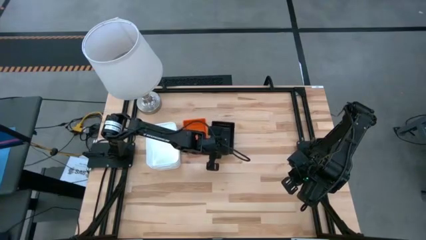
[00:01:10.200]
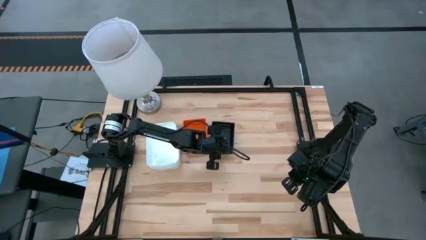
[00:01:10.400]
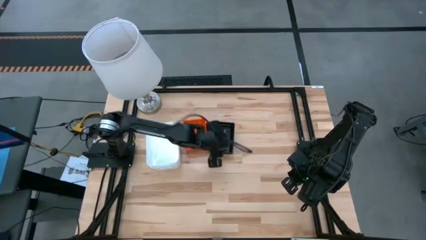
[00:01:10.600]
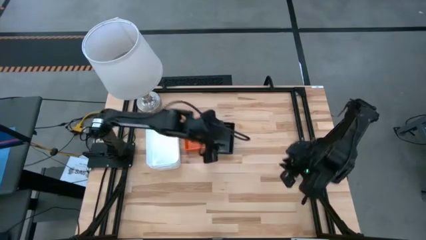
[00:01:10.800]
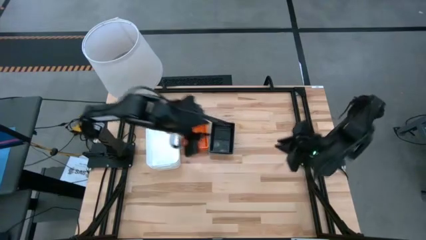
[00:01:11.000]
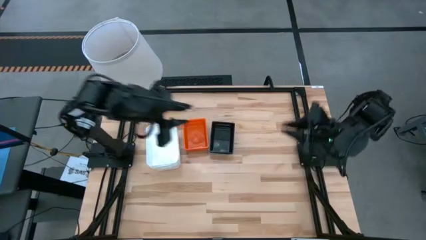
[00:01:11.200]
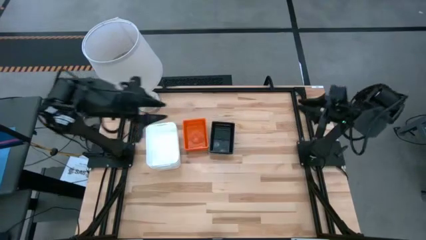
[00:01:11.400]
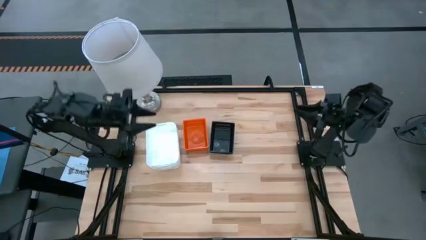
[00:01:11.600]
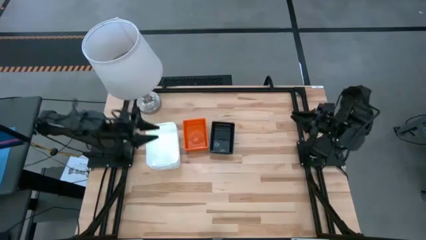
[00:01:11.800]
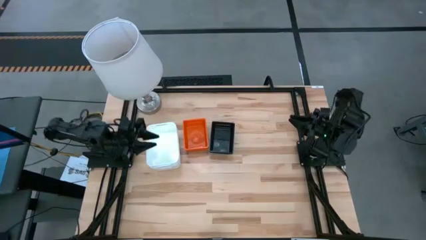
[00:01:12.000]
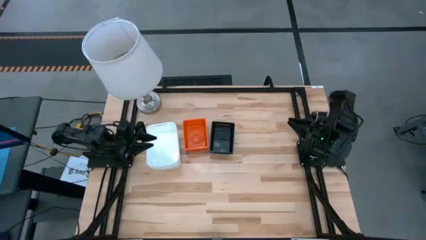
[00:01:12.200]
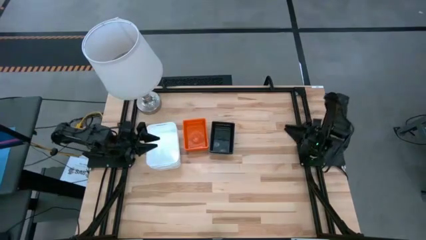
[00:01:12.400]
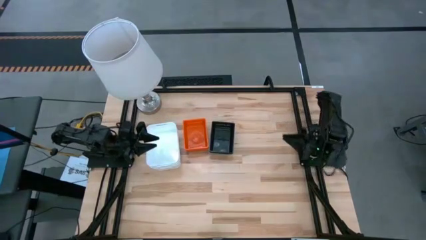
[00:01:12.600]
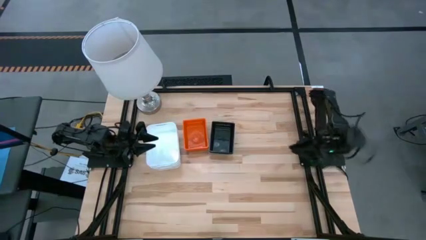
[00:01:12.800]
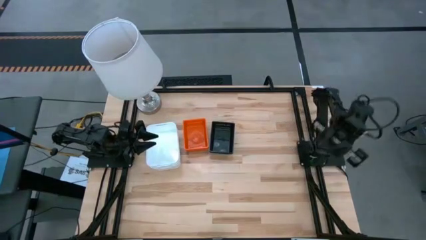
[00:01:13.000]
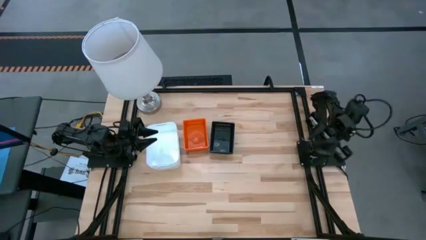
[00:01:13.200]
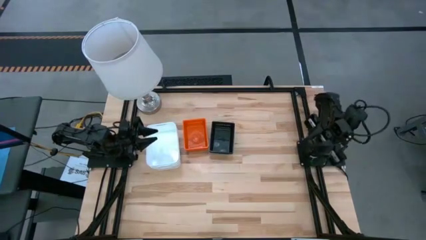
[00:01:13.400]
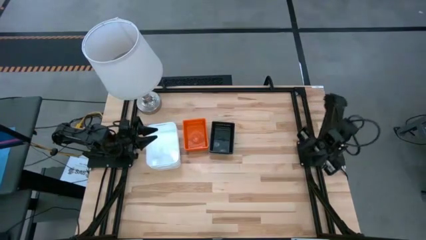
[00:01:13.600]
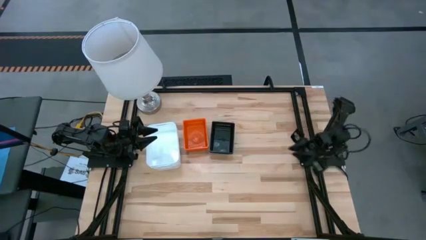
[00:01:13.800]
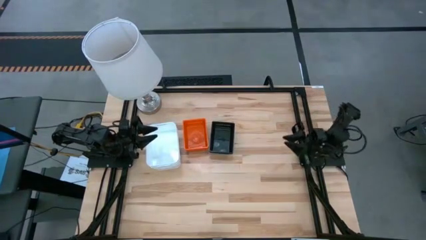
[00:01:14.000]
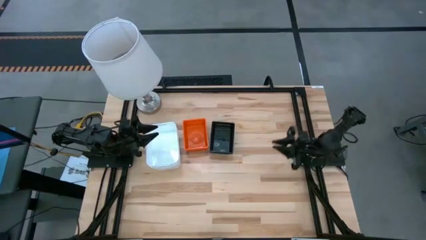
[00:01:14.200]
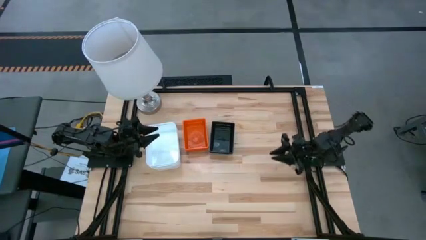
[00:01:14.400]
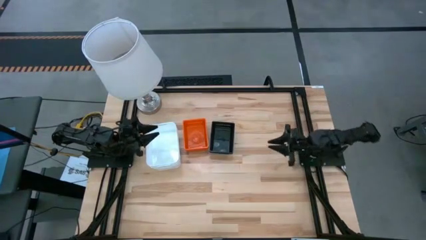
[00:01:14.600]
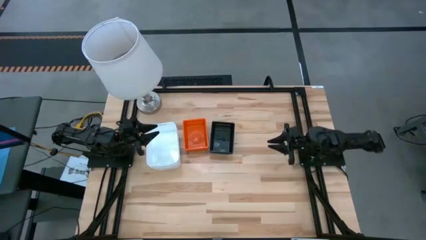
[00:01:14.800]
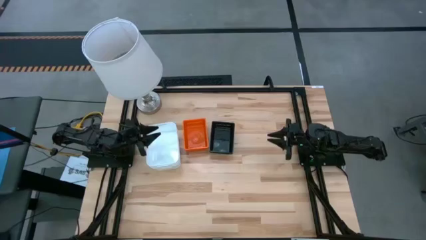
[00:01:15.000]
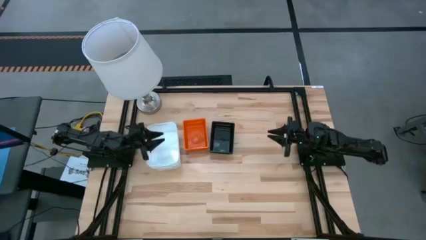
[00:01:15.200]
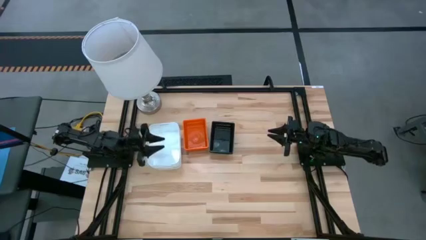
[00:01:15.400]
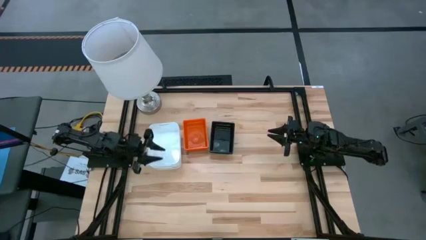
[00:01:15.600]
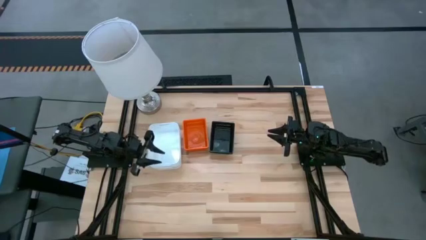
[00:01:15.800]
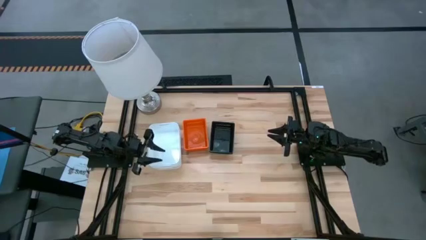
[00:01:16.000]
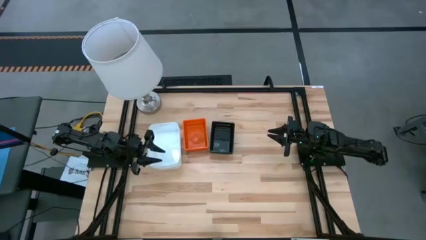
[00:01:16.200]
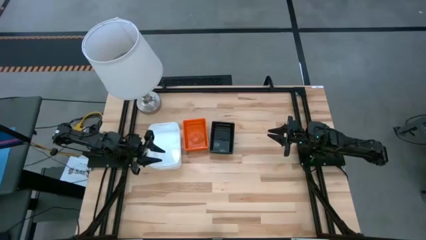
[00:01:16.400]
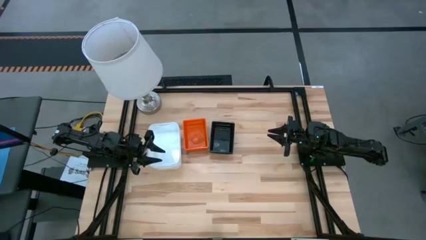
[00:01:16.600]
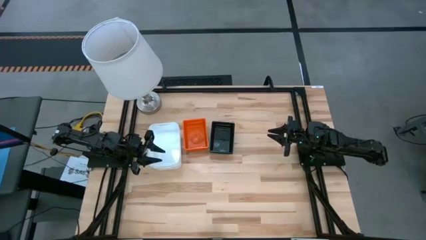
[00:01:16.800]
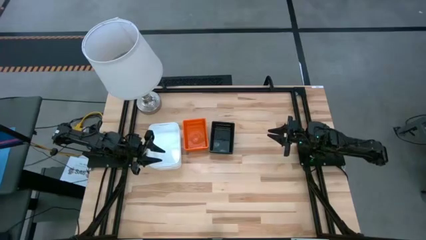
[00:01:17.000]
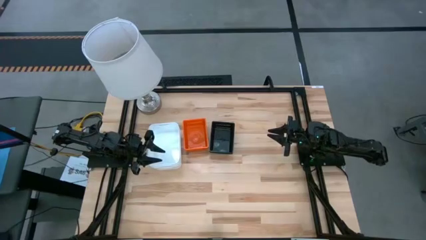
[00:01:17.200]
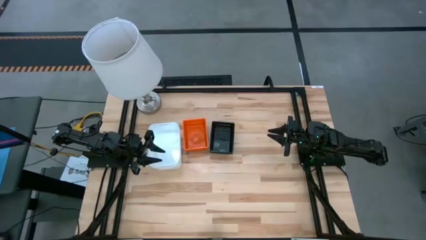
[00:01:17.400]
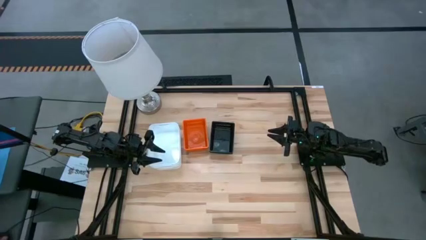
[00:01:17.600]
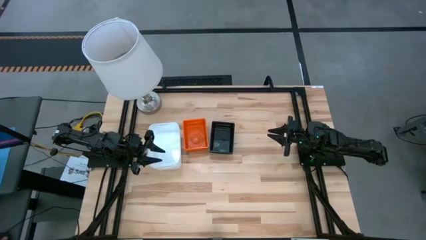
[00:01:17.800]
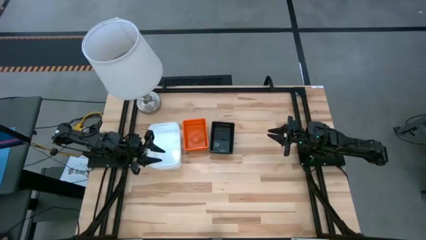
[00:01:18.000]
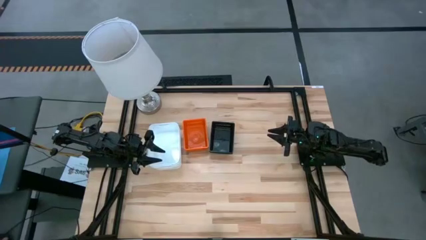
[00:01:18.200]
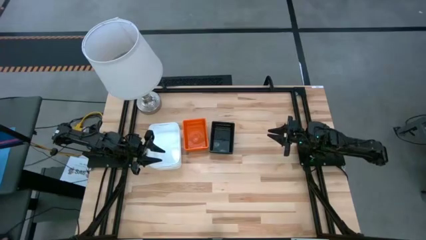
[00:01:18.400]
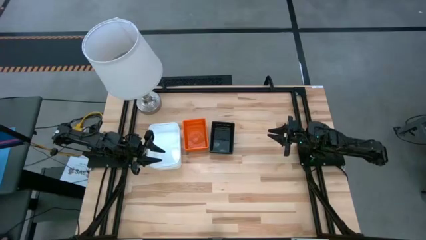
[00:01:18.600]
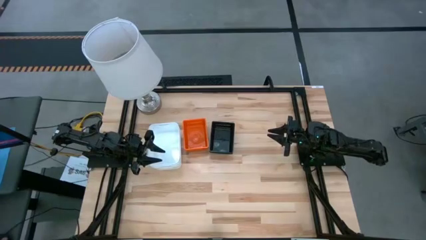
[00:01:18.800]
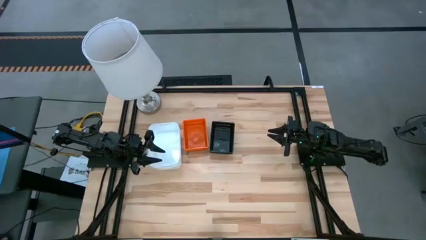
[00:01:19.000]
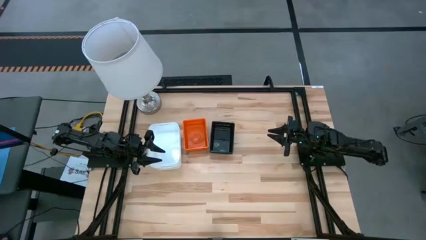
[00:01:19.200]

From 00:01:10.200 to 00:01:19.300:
Return to Home Position

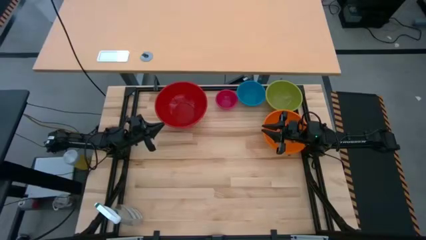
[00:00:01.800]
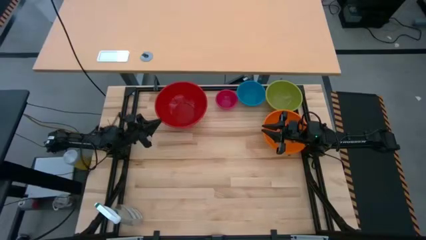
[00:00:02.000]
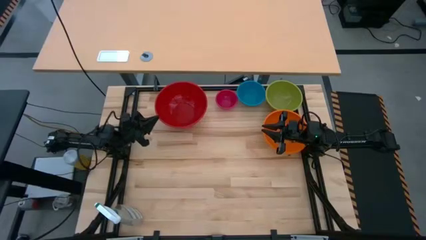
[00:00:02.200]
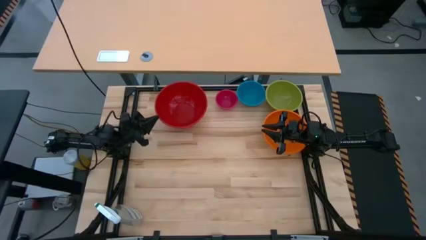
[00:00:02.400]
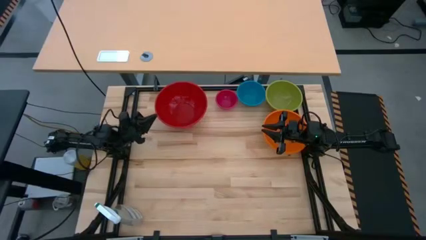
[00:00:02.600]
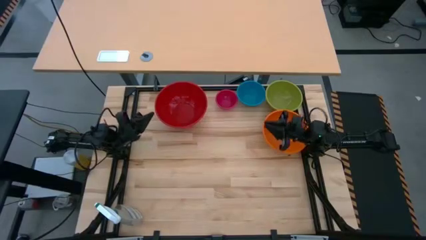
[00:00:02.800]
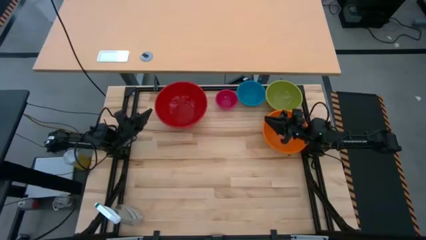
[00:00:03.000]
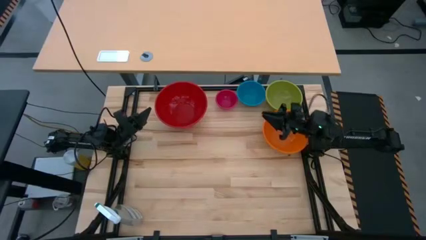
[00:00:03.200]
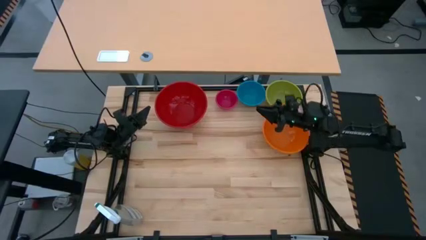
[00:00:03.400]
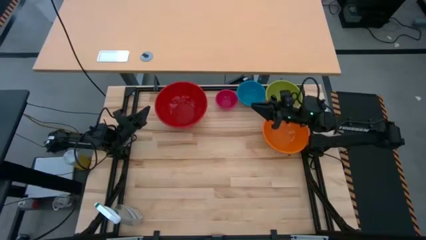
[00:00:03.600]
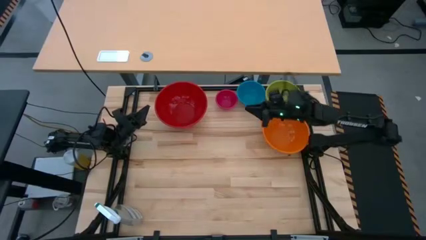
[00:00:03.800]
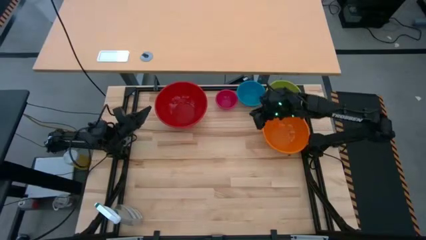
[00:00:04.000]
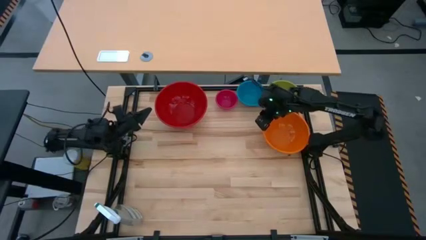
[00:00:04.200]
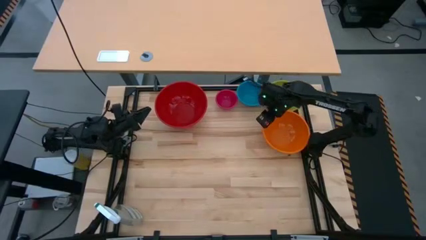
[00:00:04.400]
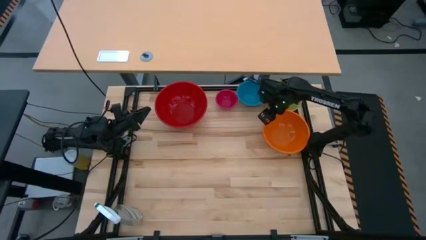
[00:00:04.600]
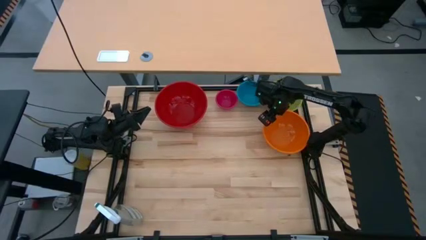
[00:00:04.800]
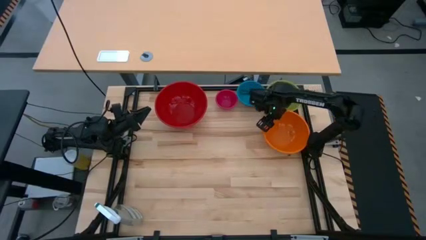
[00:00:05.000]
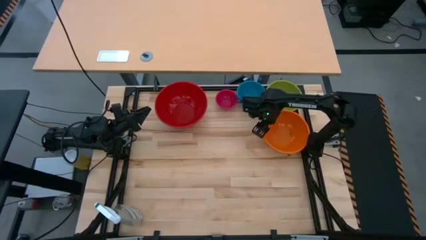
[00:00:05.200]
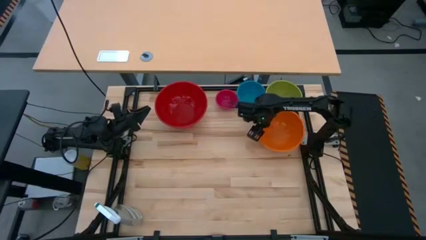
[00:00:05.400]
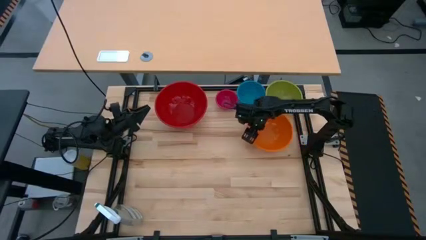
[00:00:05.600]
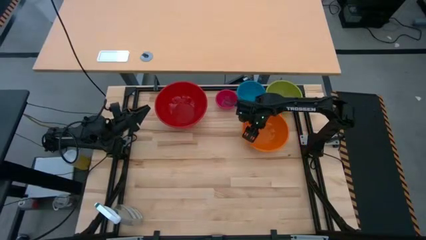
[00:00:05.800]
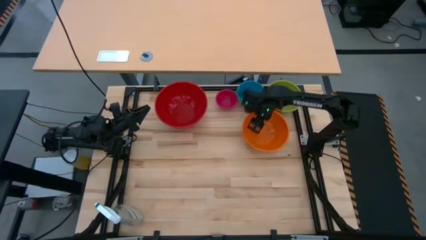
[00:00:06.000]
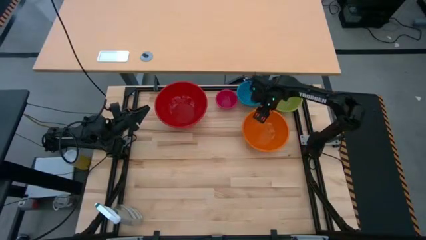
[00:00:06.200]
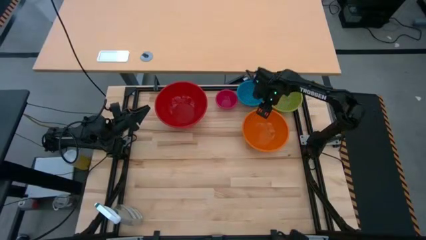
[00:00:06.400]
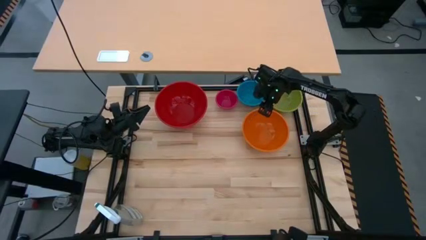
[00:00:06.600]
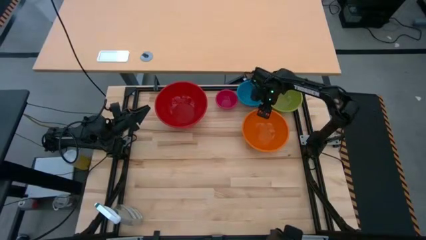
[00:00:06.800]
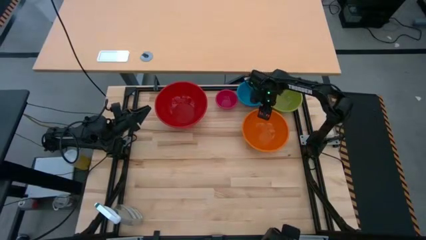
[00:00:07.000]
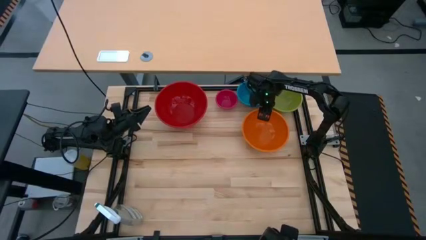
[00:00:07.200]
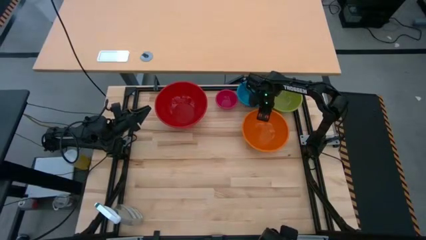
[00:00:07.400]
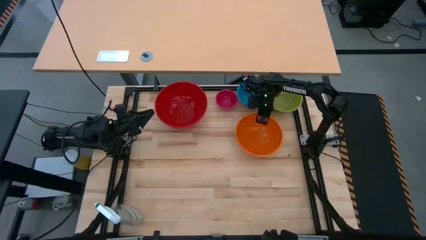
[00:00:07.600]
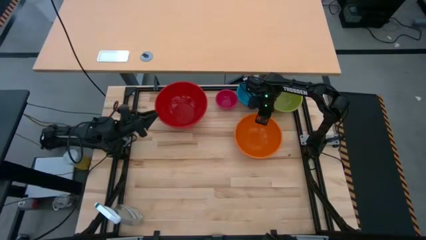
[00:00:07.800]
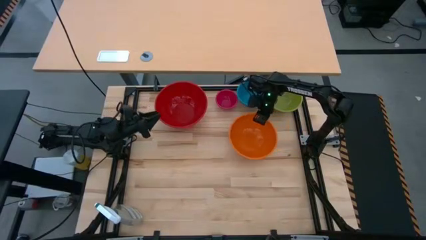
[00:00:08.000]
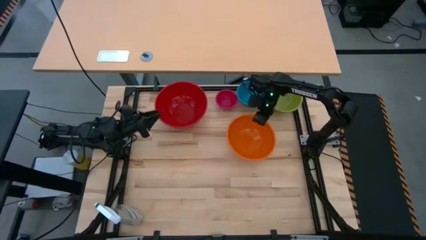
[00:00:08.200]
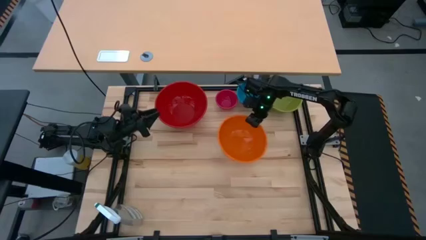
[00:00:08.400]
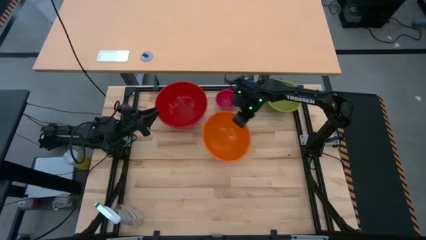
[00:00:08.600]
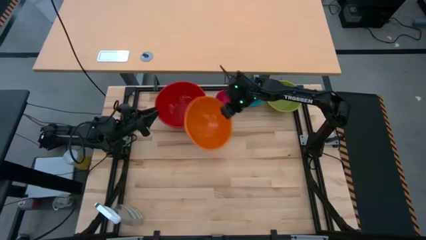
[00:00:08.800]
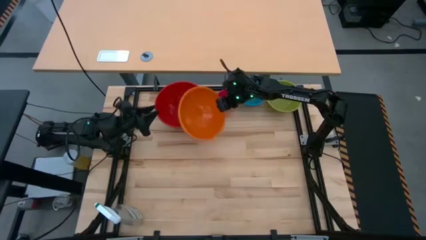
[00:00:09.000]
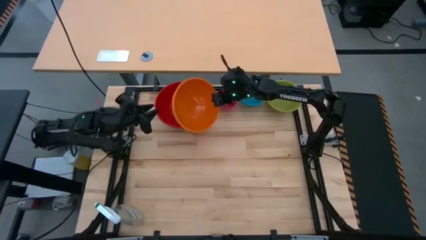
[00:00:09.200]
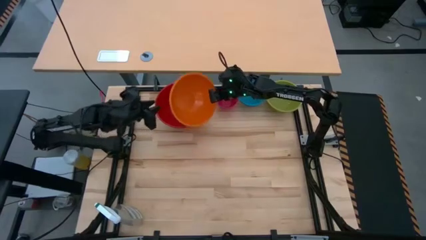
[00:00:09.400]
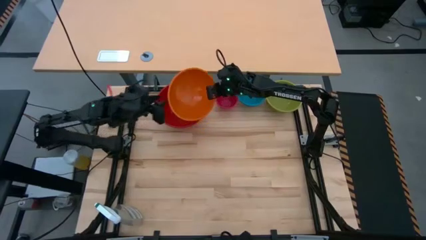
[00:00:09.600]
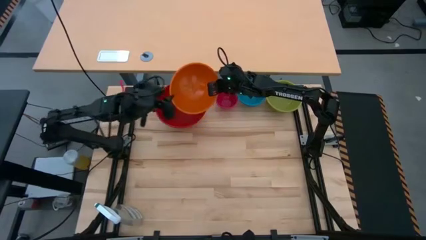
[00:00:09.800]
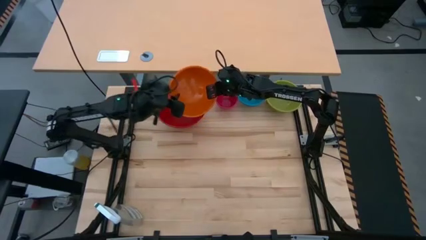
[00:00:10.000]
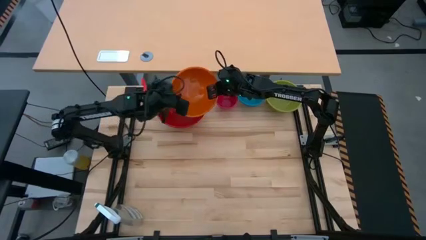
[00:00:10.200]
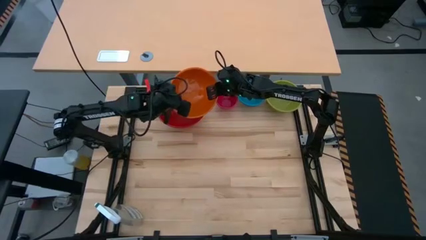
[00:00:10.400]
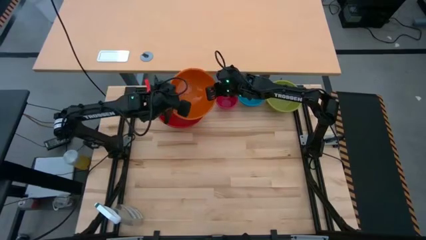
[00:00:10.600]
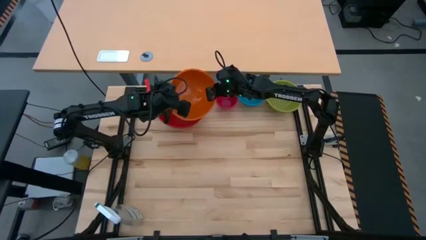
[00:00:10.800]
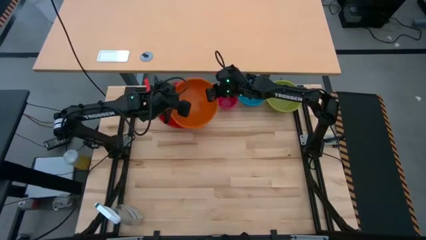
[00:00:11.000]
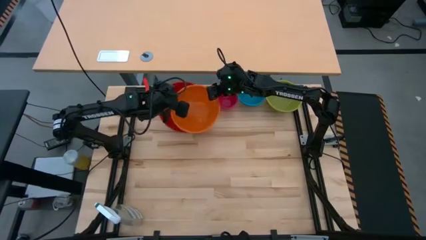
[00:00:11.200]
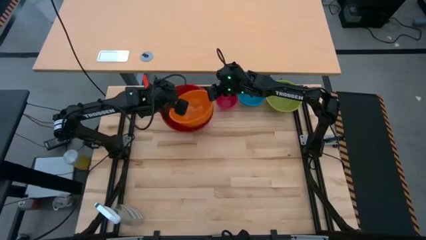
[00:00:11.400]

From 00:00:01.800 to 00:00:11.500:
Stack the orange bowl on top of the red bowl
